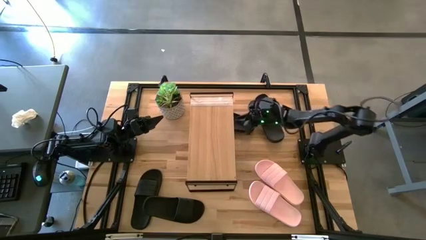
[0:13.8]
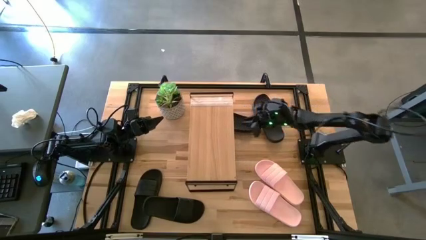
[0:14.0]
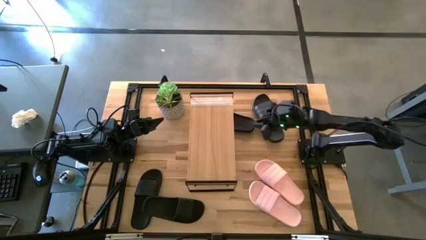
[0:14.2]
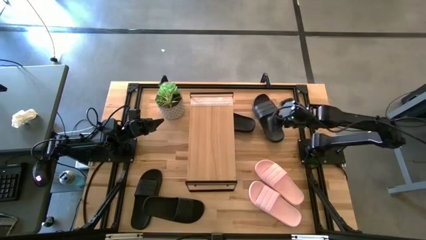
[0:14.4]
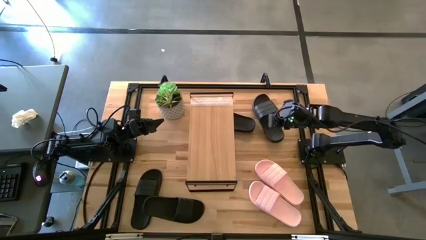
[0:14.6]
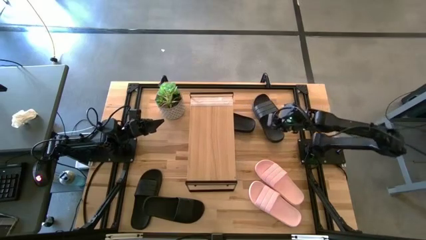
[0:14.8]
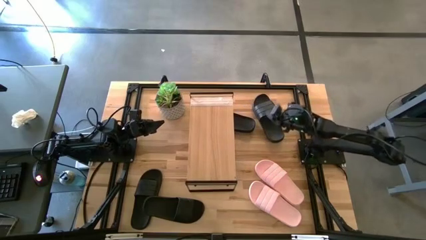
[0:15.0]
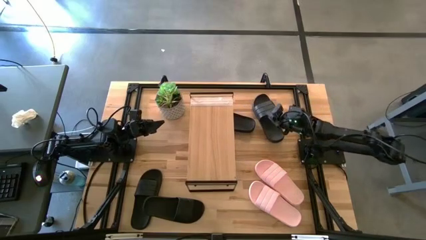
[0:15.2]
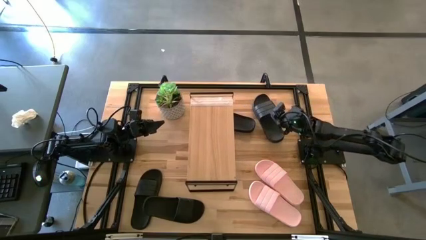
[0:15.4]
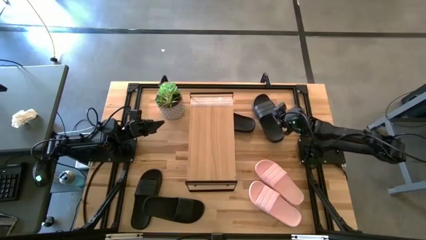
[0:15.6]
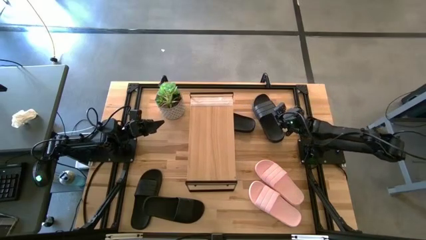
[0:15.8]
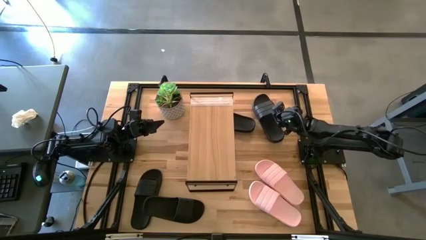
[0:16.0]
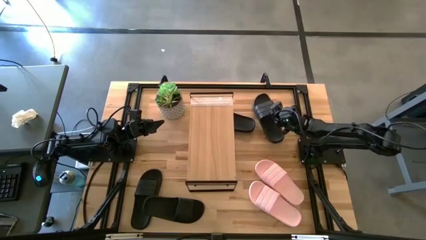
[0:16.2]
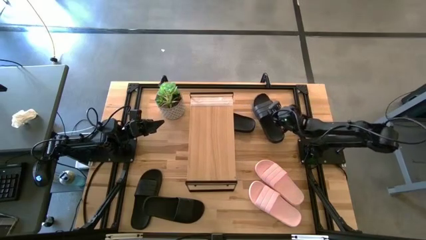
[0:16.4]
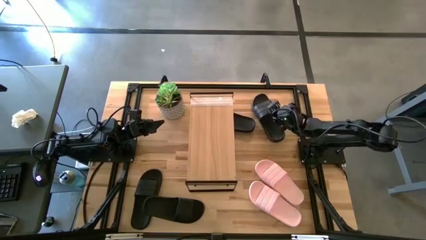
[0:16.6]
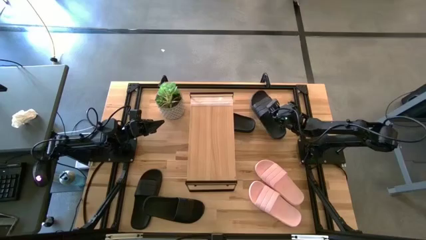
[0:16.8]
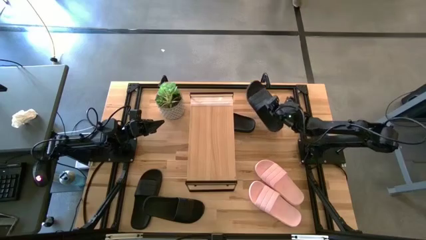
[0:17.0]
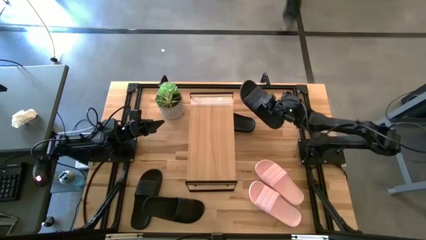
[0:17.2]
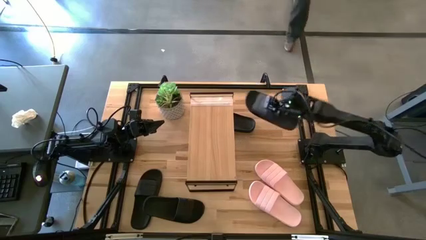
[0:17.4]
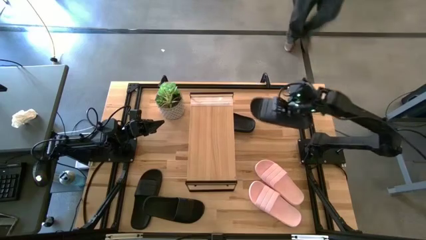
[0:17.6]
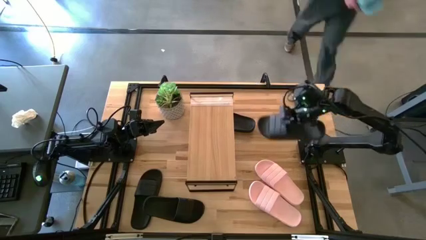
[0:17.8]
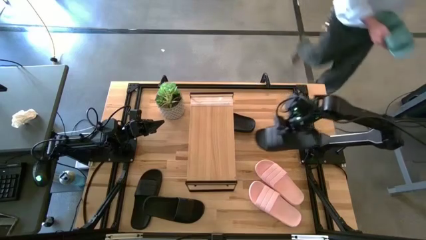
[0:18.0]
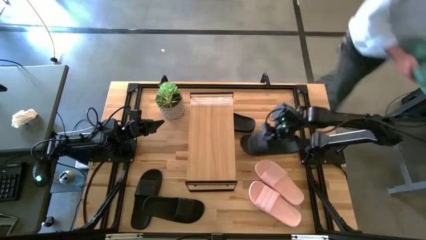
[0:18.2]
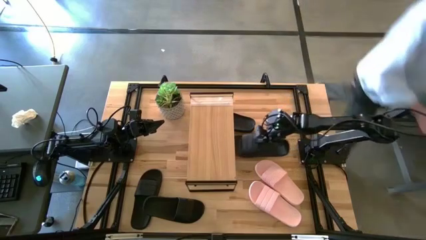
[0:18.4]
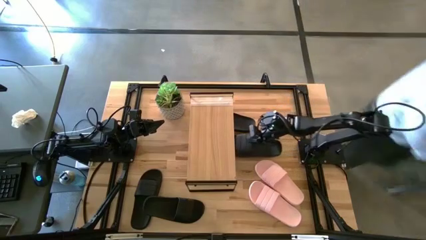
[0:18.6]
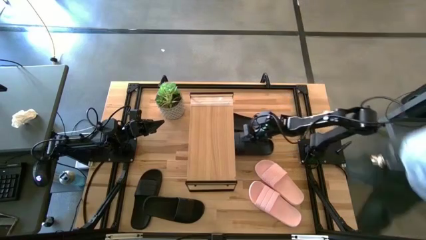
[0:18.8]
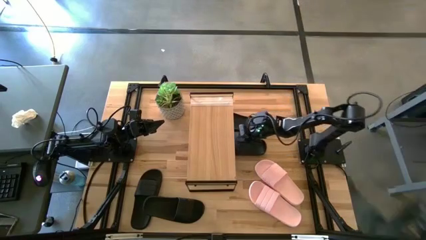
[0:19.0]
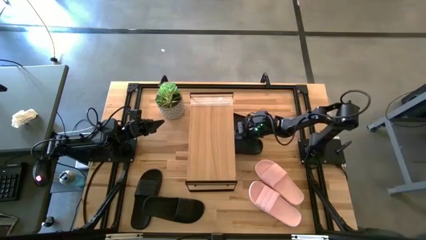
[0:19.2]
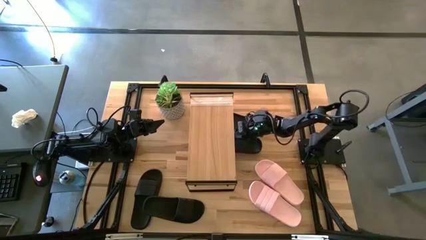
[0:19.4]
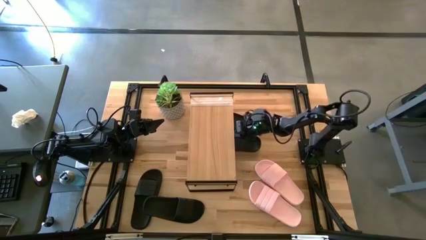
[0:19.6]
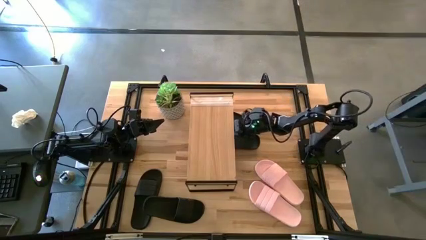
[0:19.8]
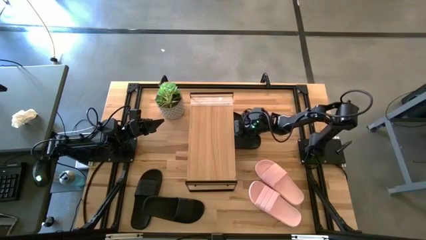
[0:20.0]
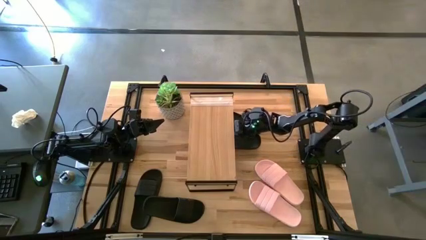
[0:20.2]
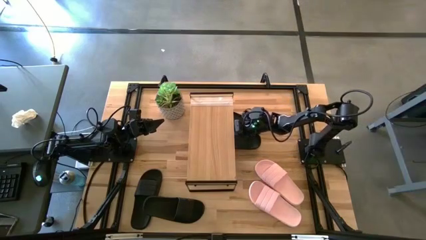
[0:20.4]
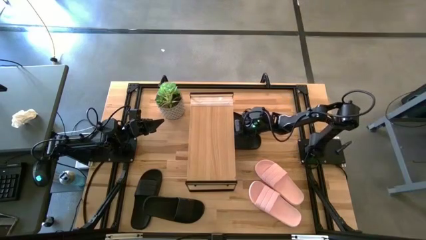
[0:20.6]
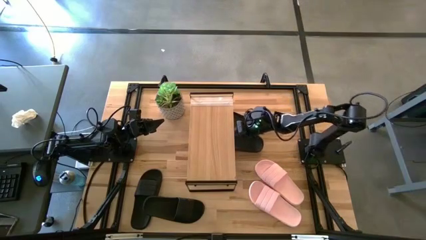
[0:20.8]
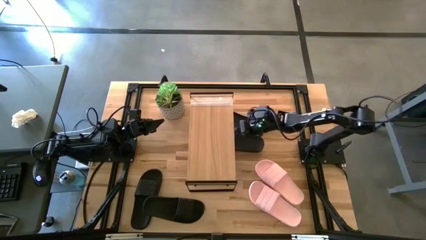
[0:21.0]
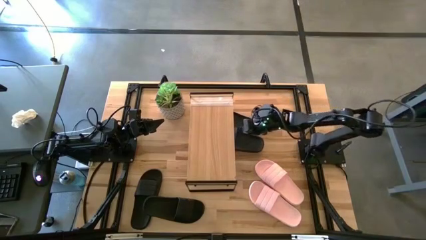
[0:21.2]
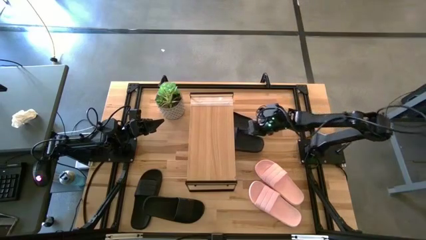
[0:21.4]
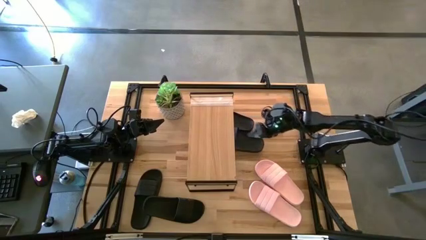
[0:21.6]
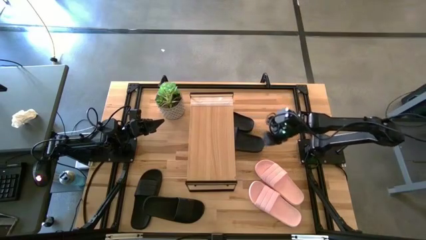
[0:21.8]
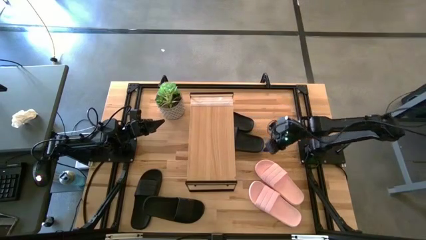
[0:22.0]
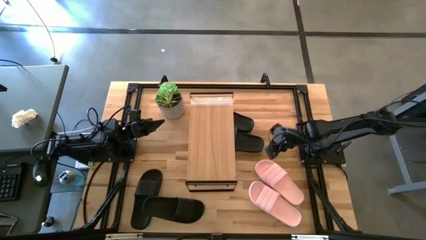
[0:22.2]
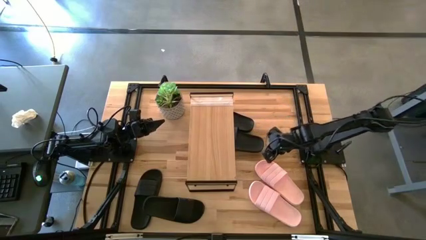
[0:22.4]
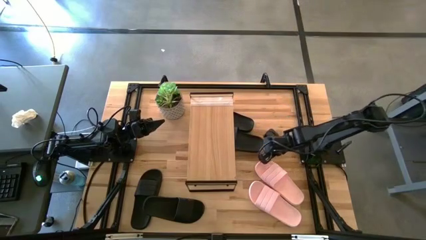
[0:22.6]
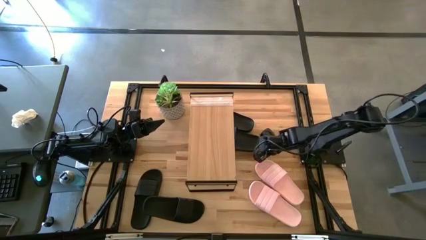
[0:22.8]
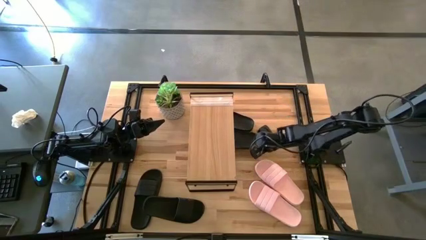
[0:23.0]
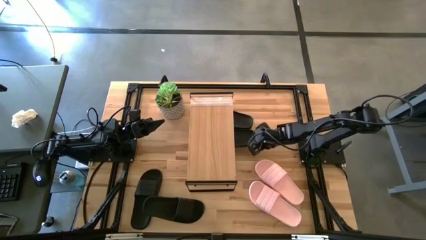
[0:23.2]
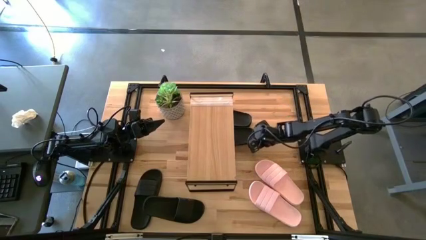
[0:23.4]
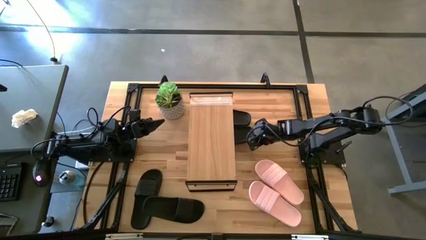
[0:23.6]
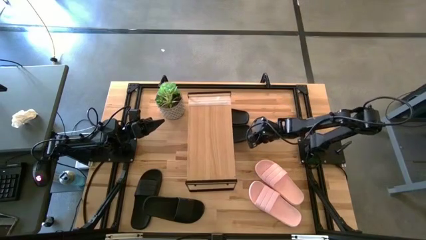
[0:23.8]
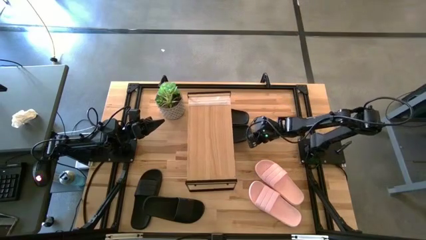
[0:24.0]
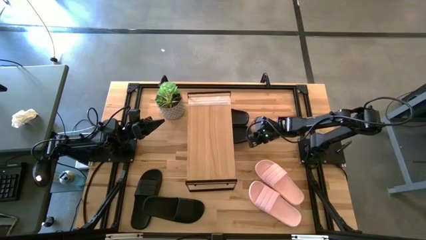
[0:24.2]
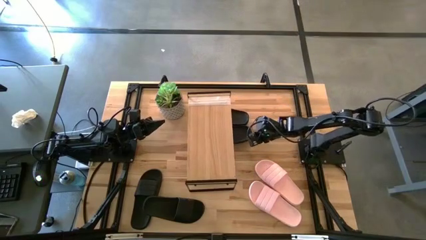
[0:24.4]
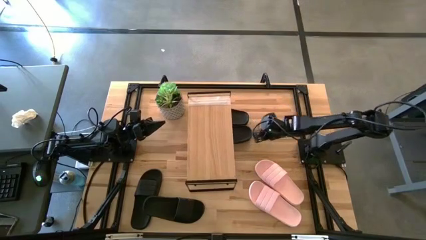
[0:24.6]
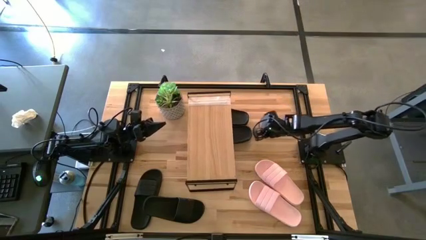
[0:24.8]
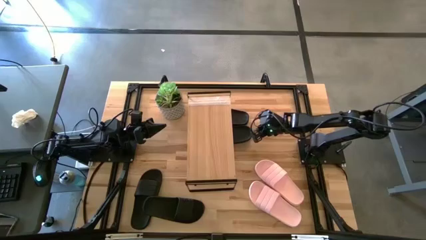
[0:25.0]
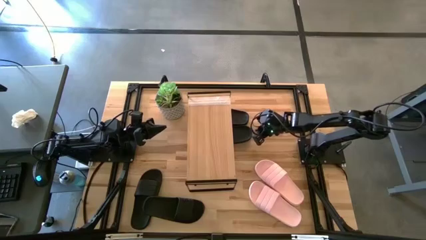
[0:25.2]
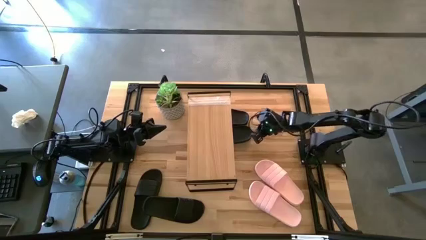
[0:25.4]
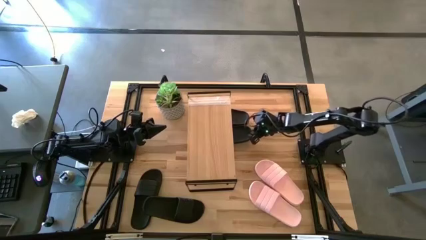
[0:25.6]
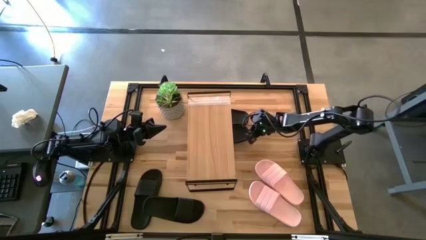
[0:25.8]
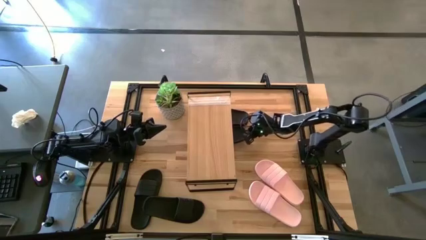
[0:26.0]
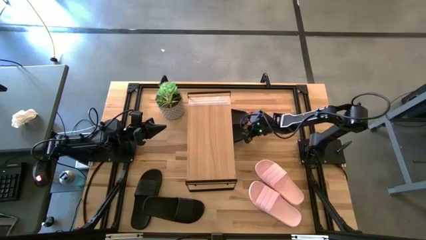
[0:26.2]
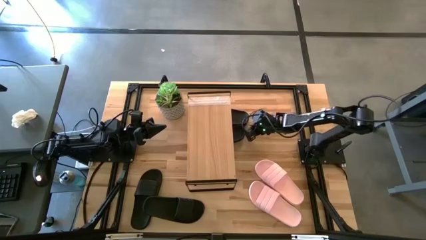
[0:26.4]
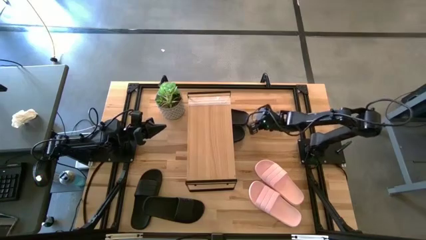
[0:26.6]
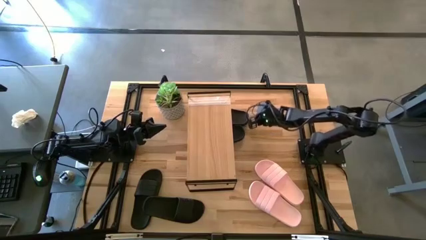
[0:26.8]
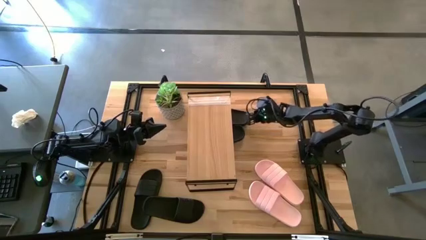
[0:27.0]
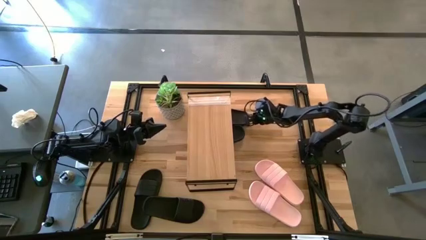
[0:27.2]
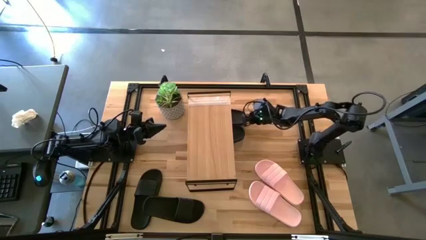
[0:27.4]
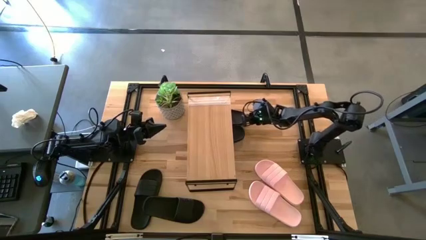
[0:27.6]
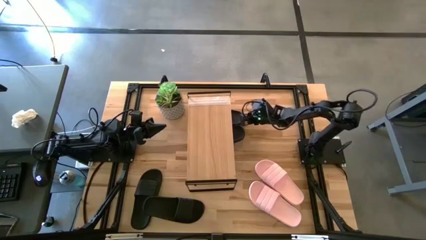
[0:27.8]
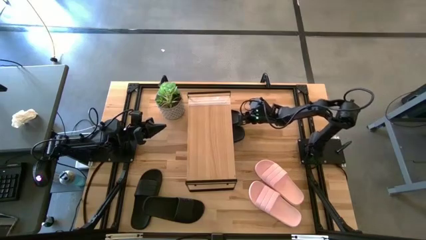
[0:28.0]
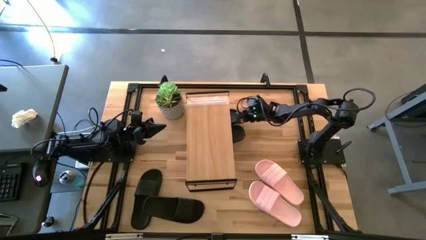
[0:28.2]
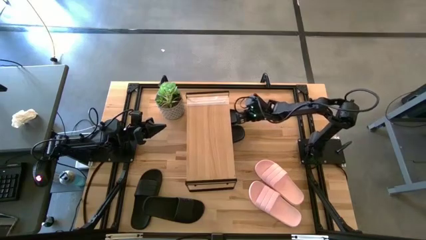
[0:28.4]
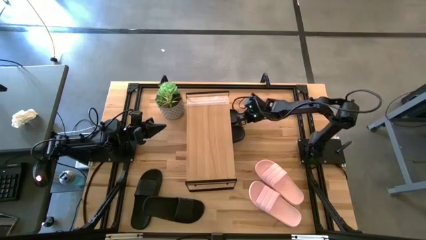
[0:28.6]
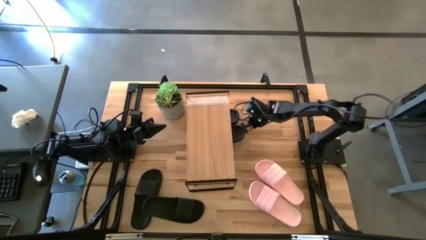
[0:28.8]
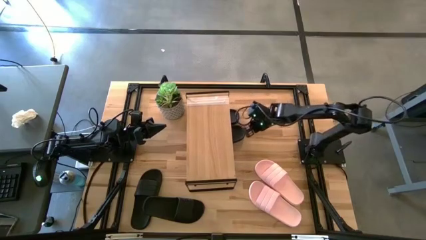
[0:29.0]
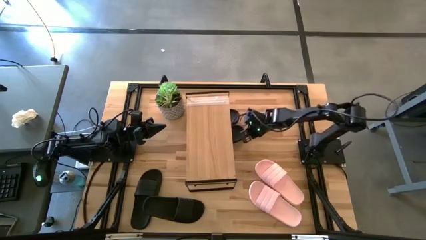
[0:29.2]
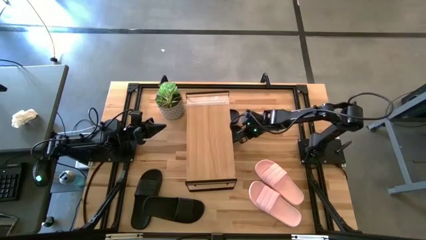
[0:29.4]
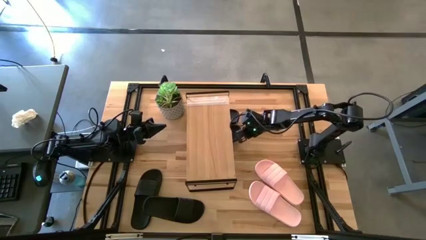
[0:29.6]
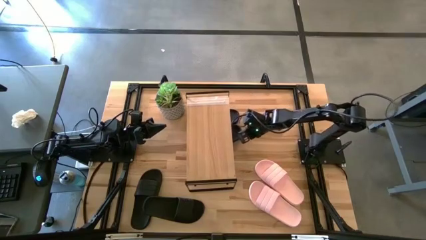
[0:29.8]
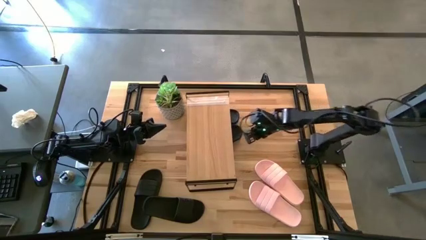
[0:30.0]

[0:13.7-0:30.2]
Task: Pick and place slides into the shelf
Move the top black slide under the shelf
